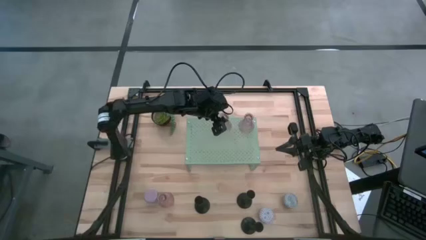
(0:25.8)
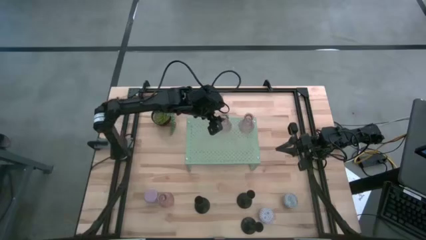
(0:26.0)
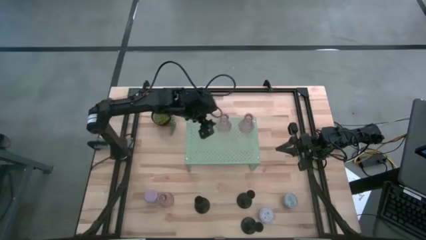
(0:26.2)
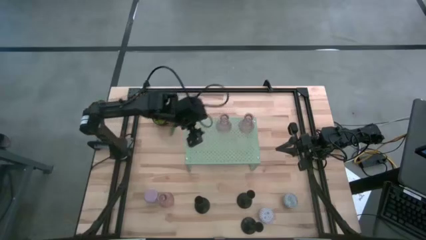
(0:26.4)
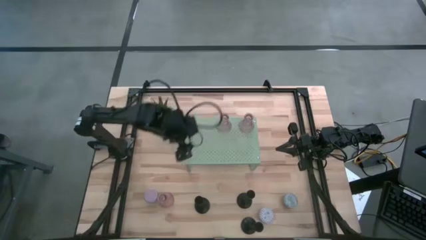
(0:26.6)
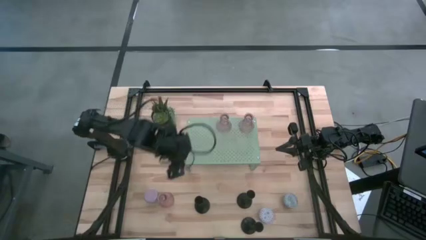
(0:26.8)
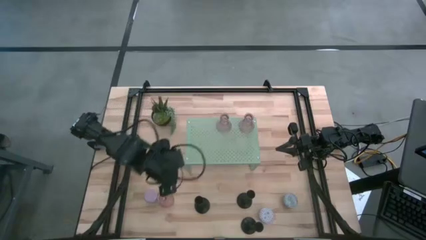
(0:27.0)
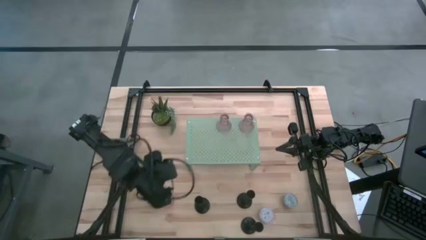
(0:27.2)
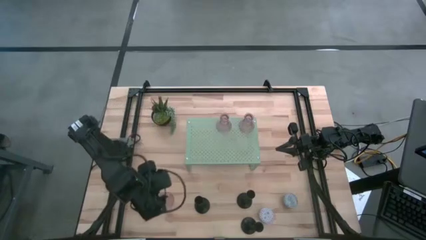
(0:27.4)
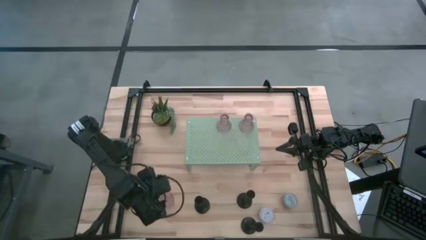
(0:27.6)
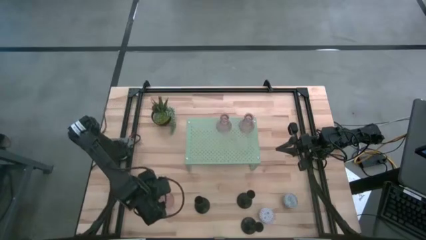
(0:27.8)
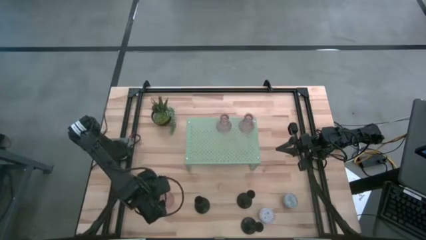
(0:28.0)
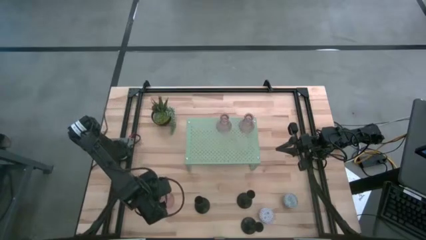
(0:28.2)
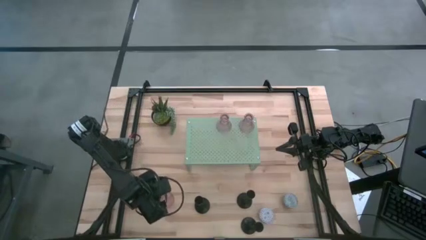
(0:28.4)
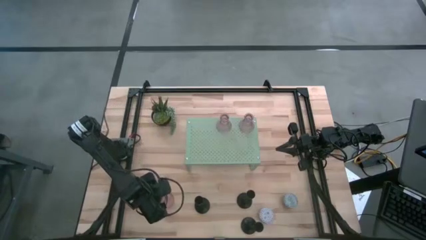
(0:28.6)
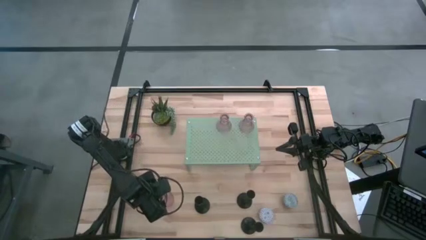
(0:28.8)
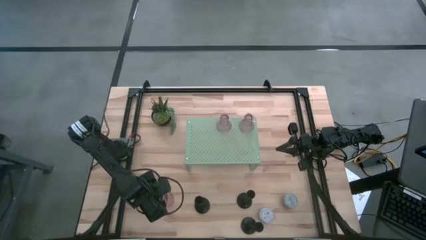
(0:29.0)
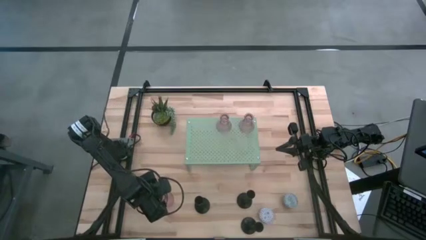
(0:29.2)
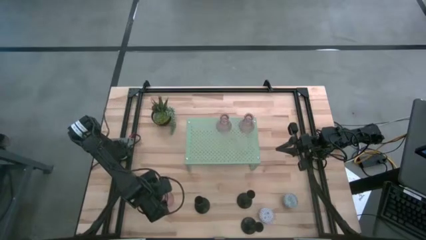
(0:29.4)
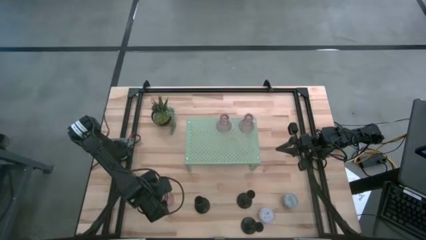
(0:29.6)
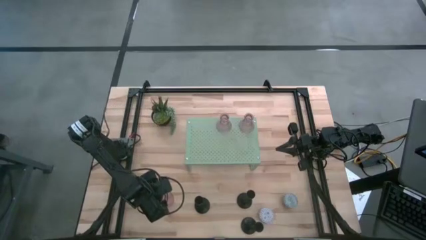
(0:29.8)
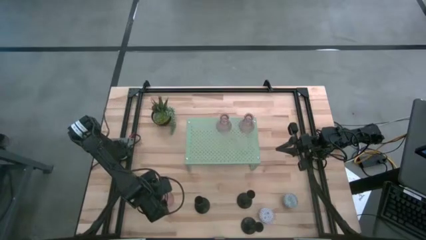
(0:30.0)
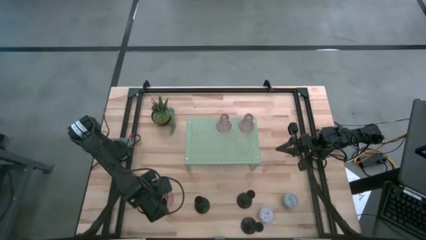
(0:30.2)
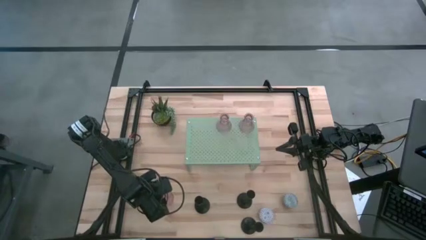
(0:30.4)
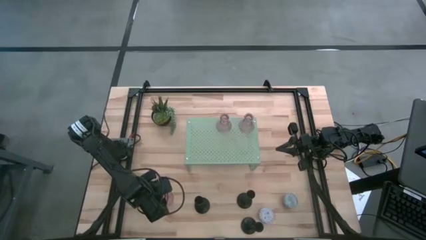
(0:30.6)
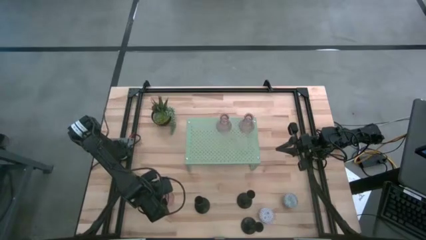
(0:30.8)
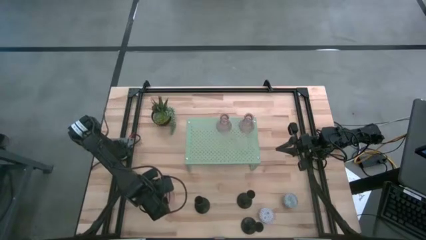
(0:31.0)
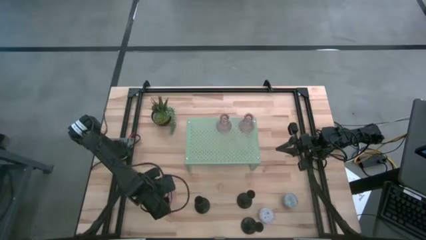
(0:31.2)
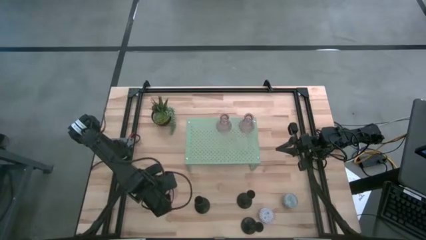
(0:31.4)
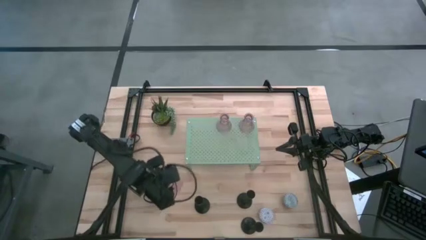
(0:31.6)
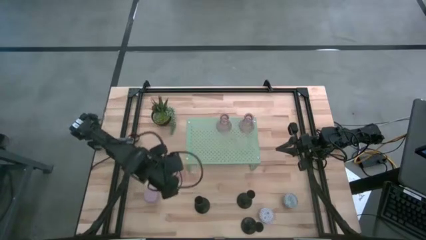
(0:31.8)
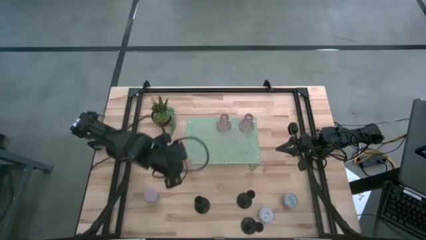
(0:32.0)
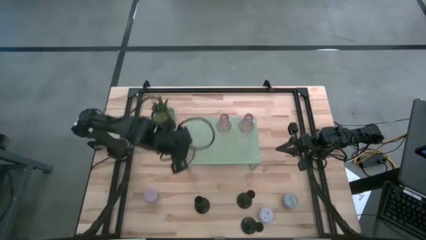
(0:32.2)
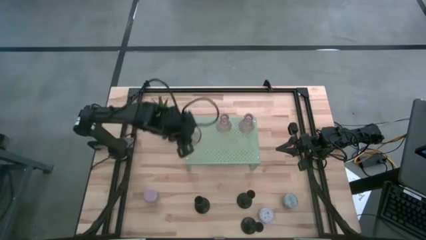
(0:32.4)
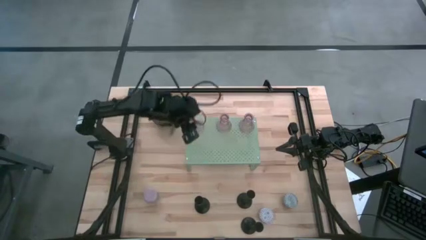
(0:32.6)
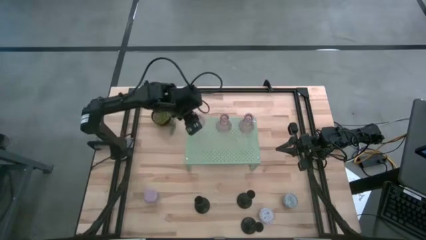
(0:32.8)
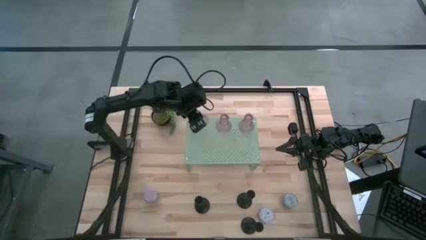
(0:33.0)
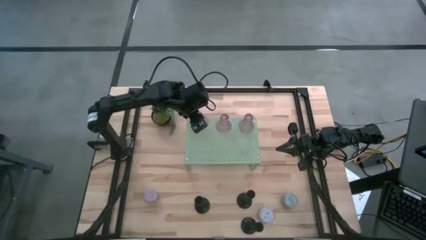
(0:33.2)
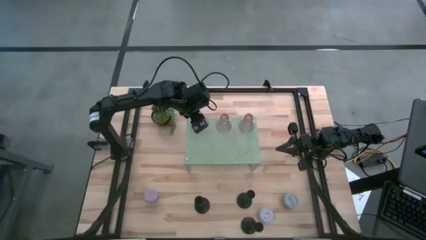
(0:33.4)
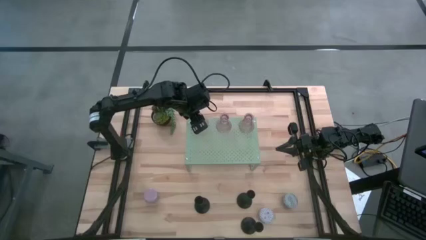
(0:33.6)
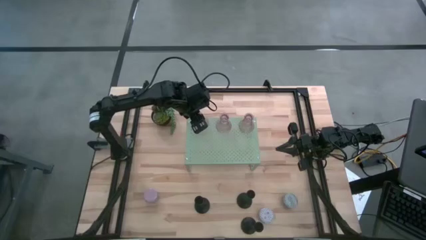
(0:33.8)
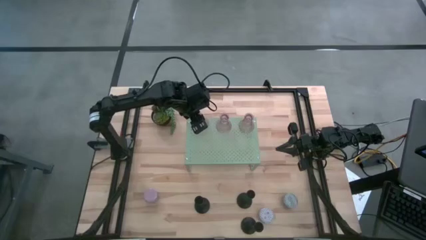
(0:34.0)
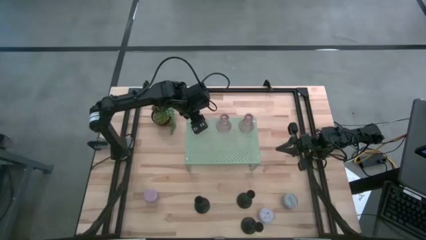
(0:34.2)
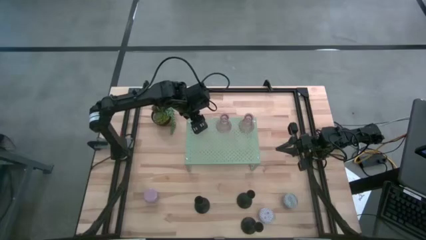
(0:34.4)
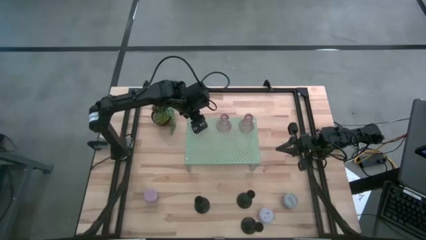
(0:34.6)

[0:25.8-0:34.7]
Task: Pick & Place candle stick holders
Put the glass candle holder on the shelf

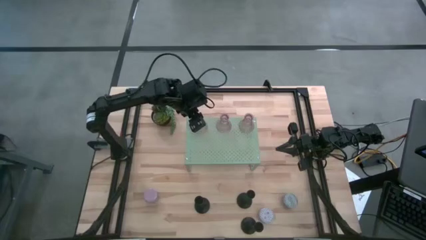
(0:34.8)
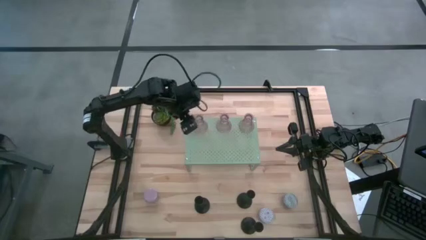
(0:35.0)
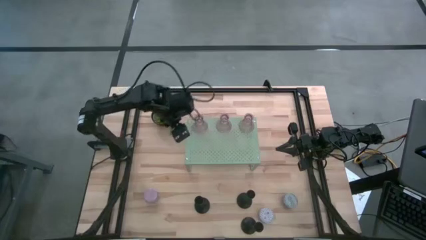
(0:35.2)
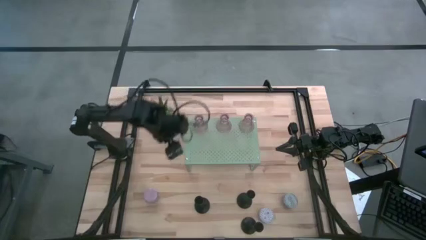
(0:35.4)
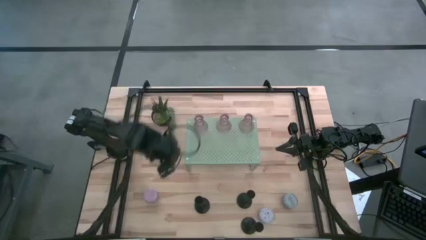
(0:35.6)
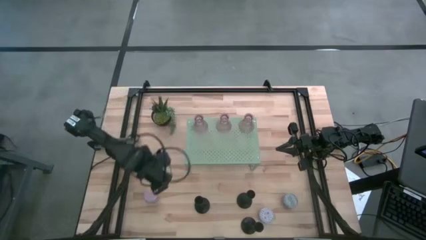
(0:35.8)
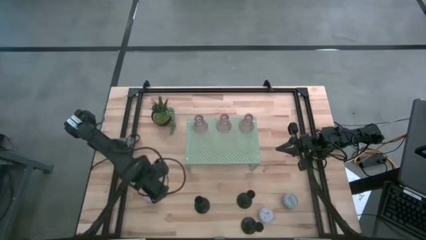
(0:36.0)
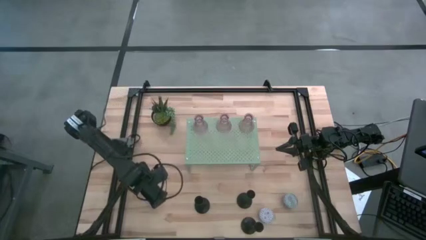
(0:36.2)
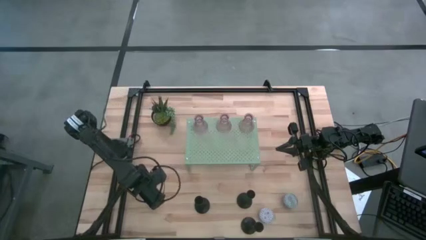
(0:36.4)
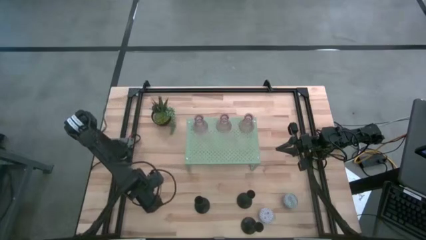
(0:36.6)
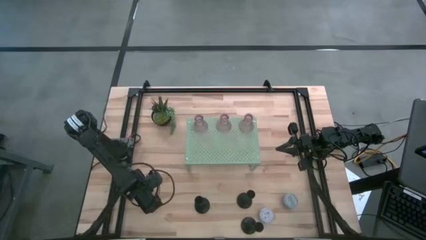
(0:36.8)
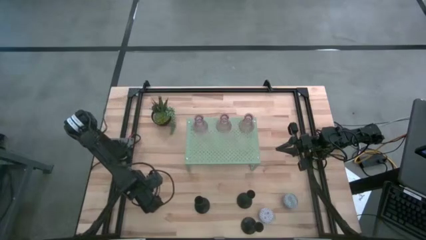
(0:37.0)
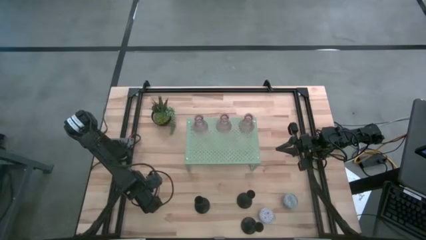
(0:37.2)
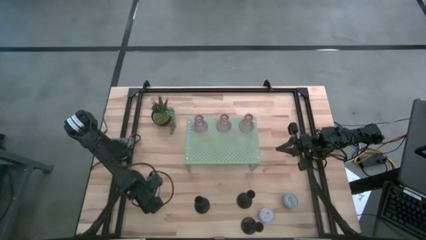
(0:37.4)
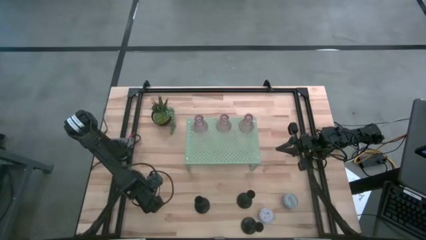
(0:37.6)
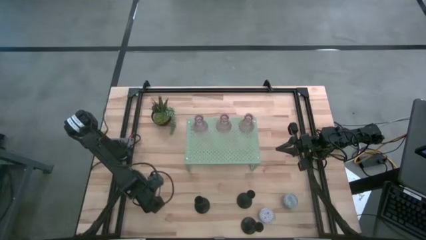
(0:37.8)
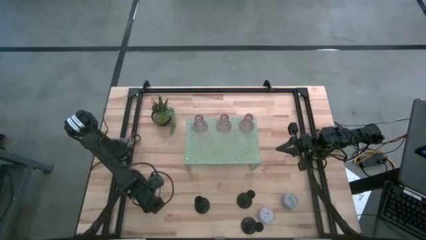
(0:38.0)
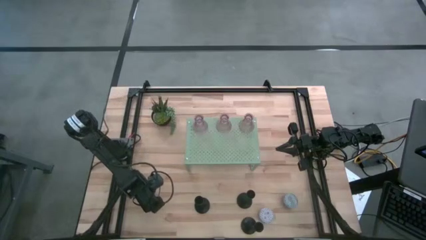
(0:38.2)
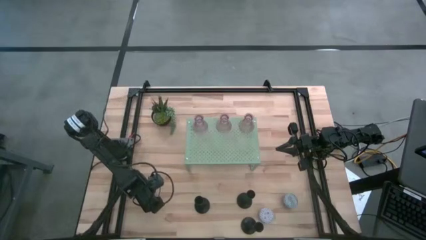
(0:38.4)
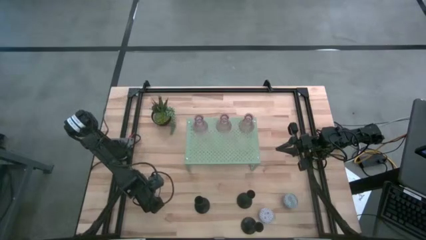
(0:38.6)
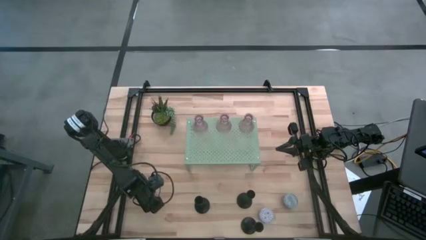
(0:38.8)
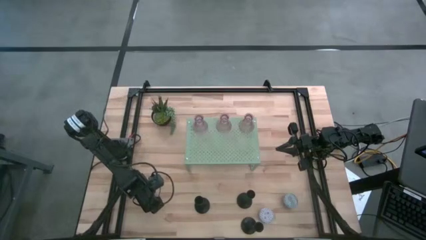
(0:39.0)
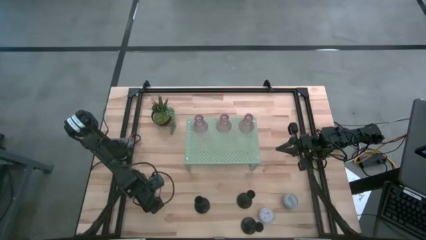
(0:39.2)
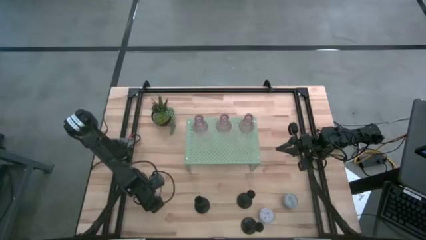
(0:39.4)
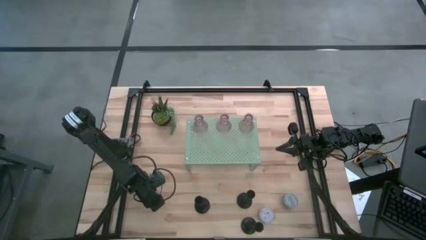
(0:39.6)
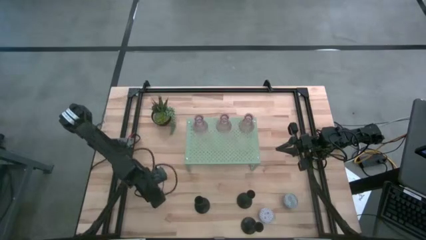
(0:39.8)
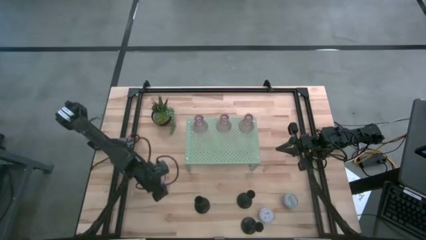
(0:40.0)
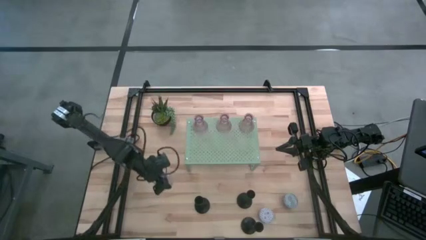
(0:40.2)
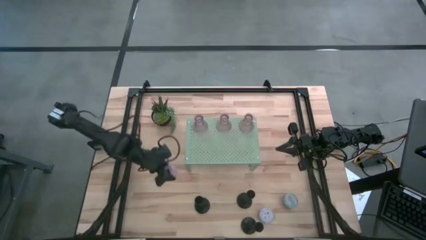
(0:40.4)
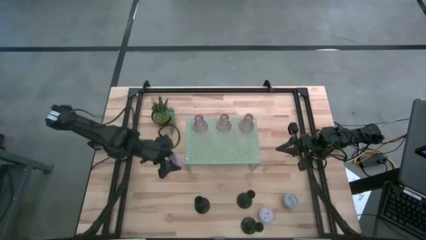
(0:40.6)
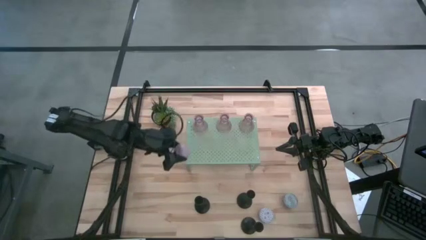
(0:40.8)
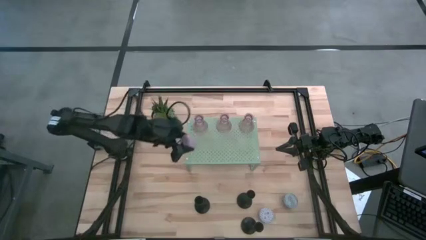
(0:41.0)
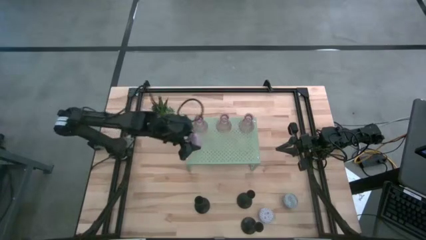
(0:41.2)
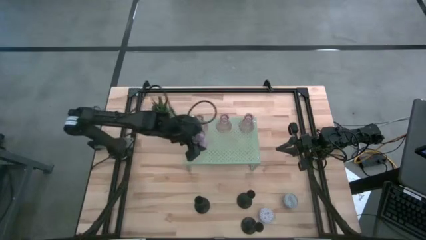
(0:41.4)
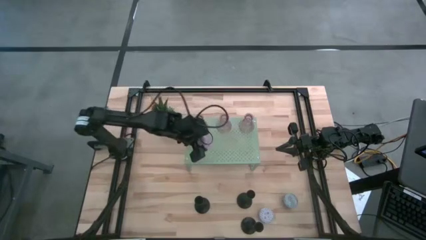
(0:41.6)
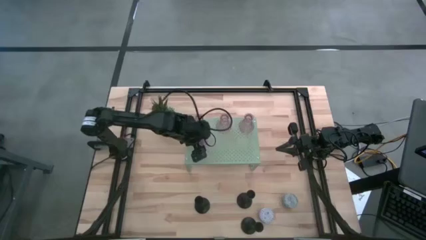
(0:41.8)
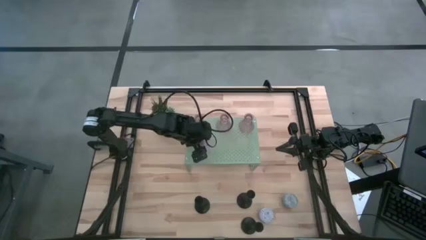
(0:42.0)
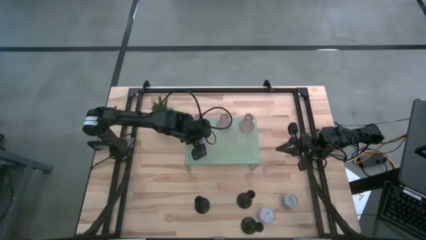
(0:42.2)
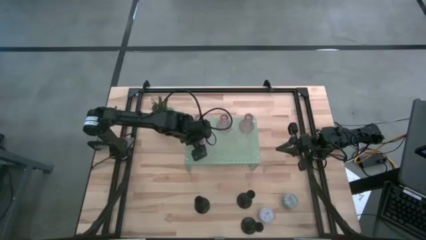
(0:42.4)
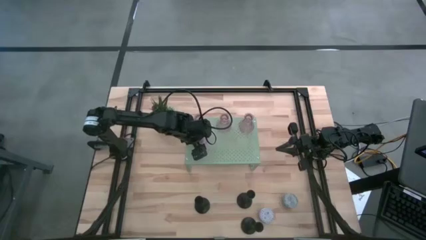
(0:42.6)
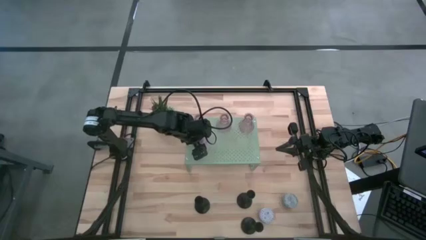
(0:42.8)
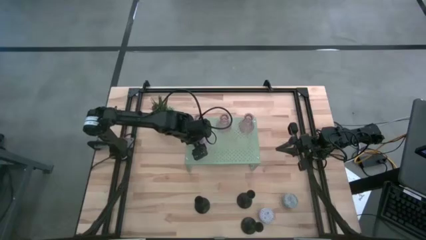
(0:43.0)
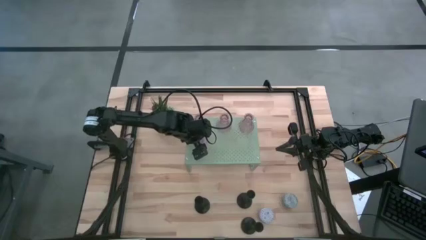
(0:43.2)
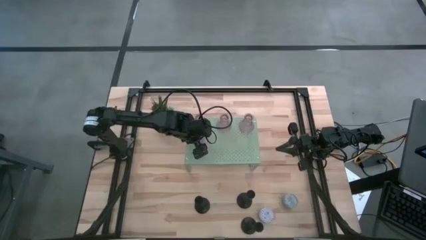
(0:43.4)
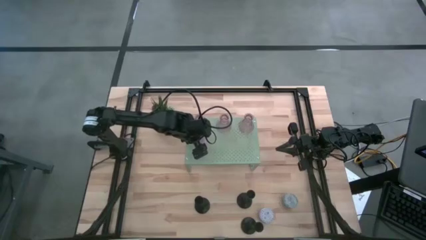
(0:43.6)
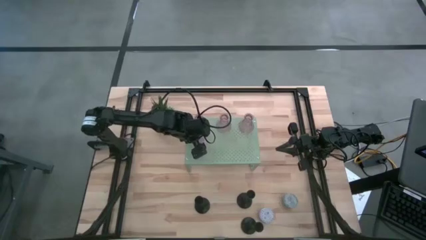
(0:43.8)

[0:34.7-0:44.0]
Put the pink scented candle on the shelf
